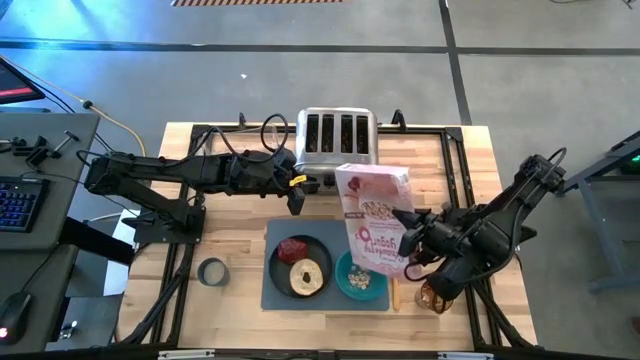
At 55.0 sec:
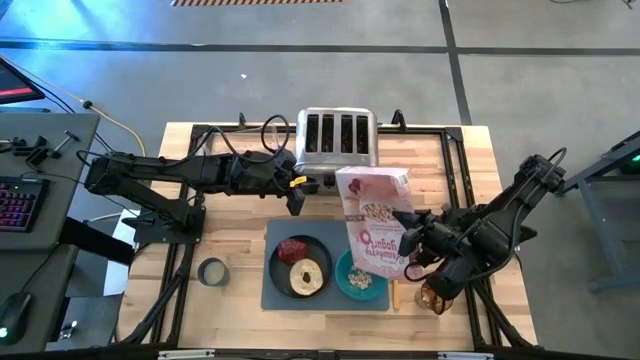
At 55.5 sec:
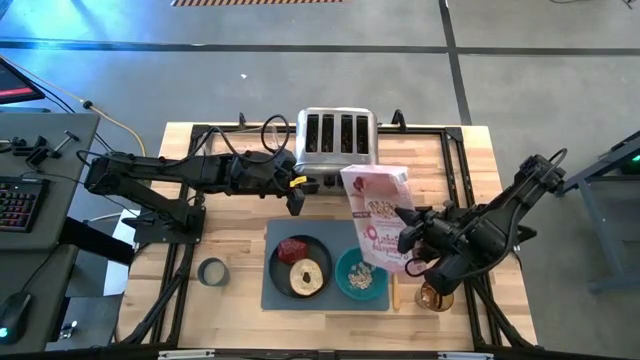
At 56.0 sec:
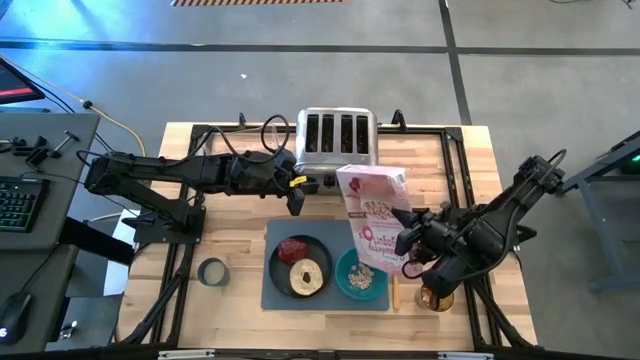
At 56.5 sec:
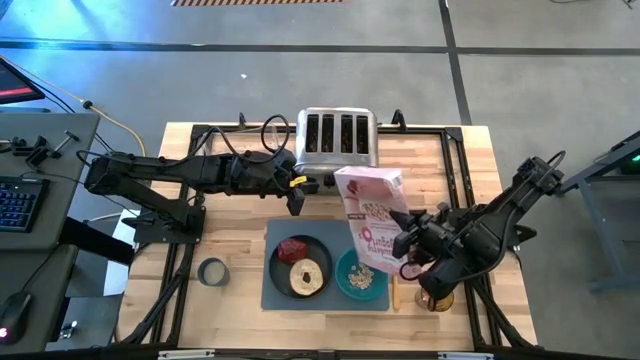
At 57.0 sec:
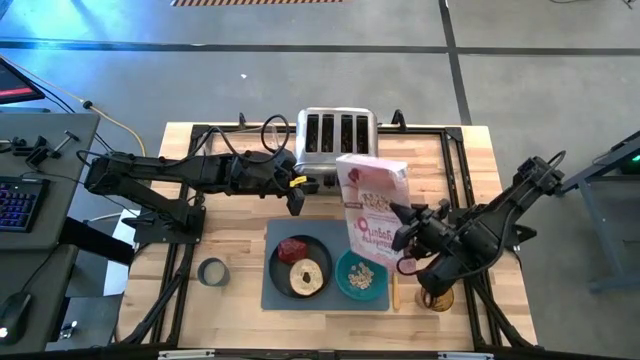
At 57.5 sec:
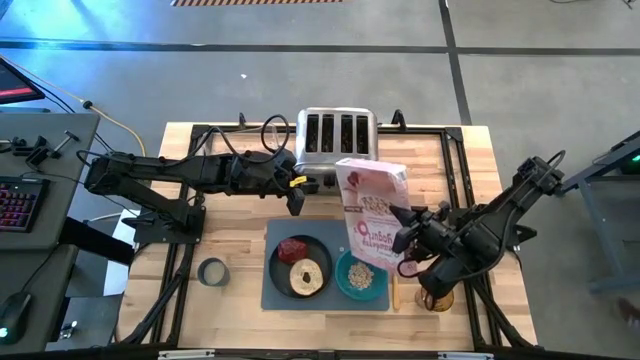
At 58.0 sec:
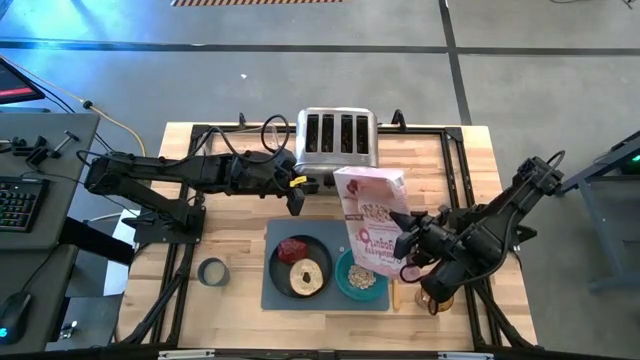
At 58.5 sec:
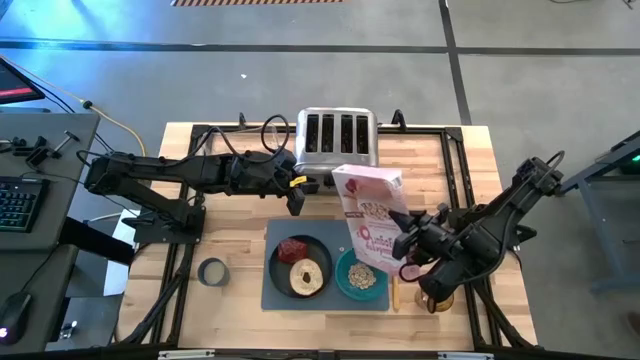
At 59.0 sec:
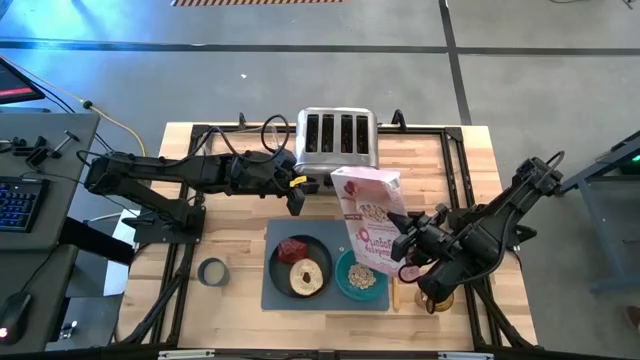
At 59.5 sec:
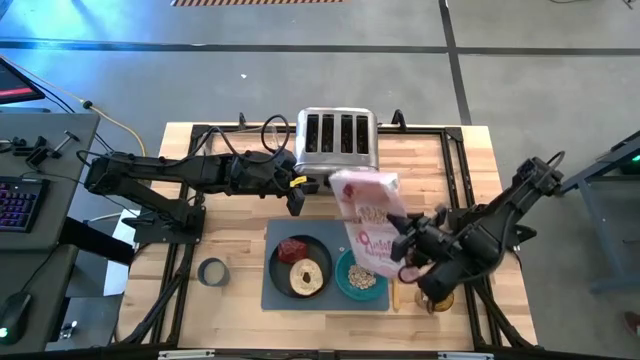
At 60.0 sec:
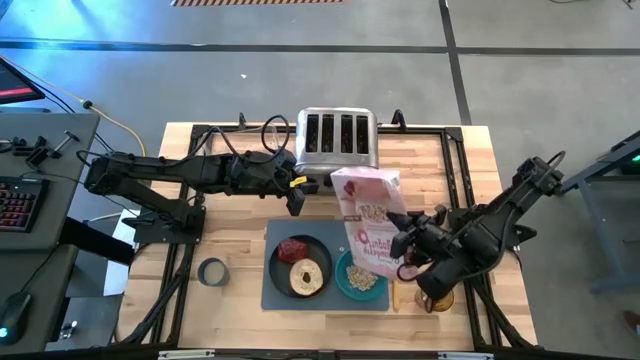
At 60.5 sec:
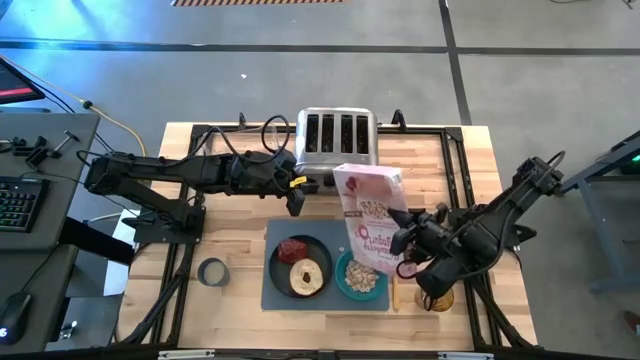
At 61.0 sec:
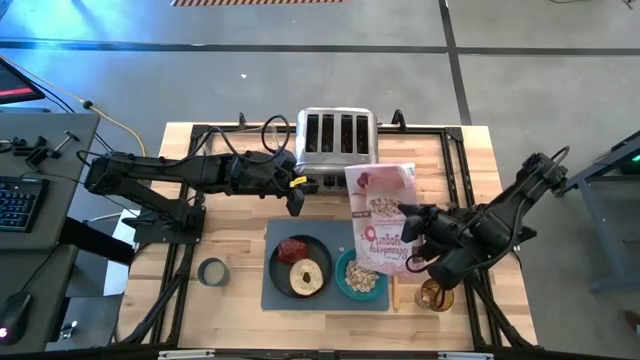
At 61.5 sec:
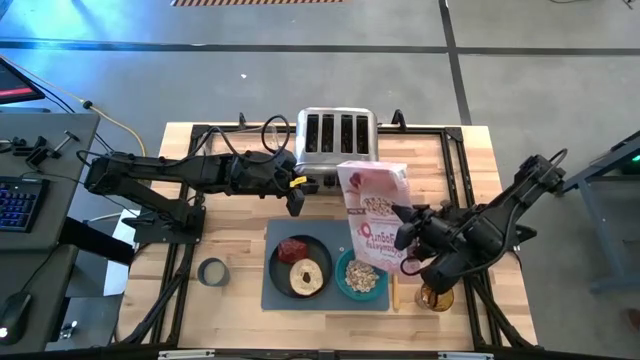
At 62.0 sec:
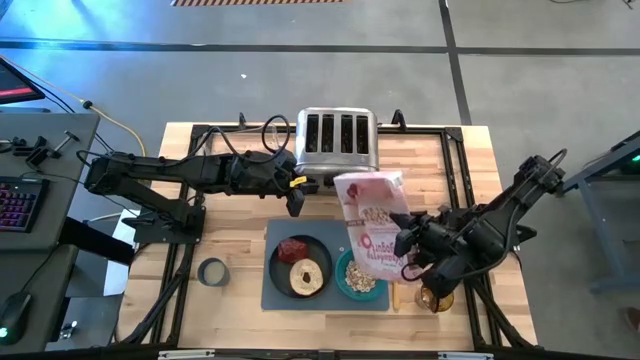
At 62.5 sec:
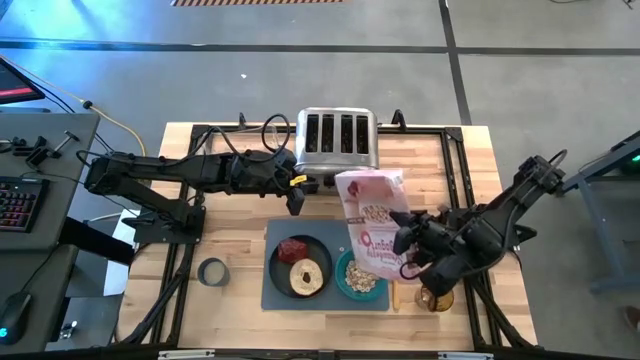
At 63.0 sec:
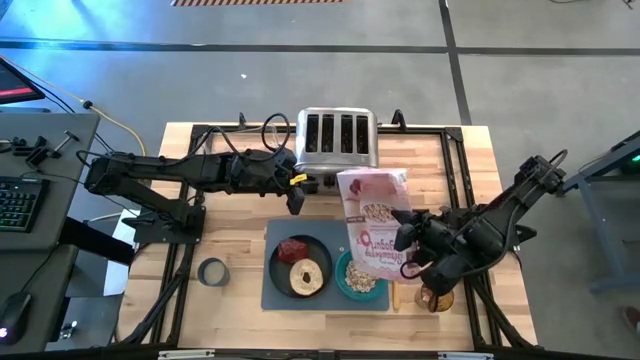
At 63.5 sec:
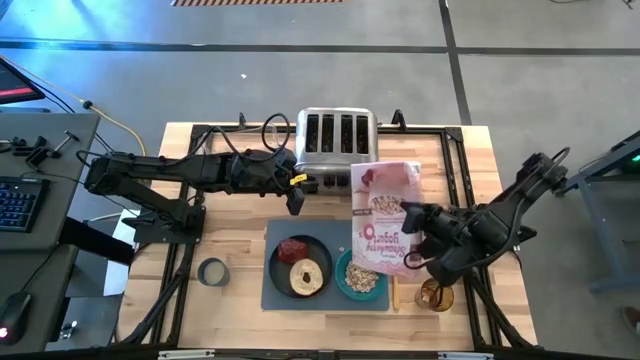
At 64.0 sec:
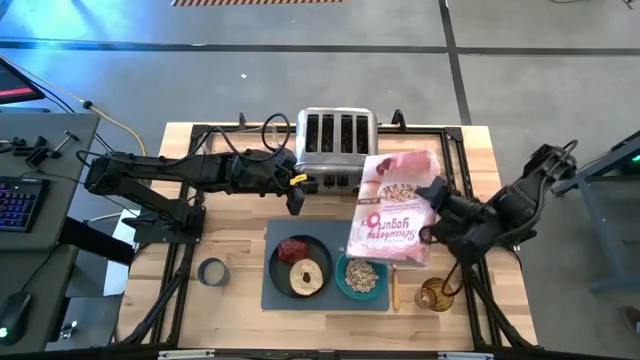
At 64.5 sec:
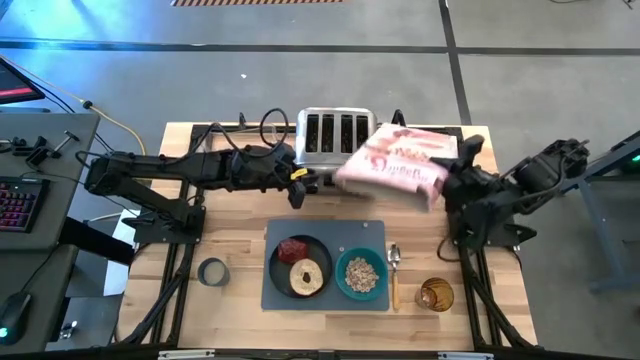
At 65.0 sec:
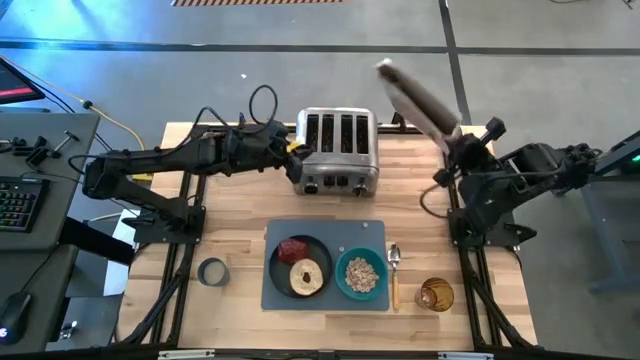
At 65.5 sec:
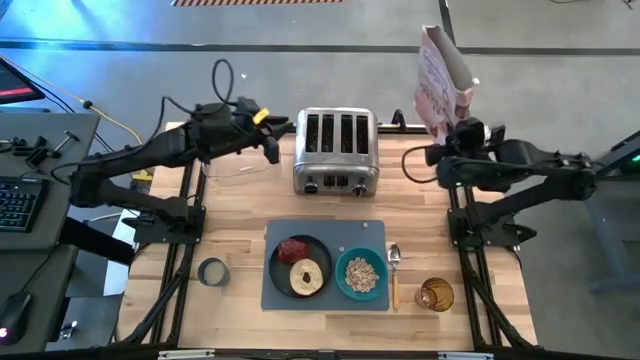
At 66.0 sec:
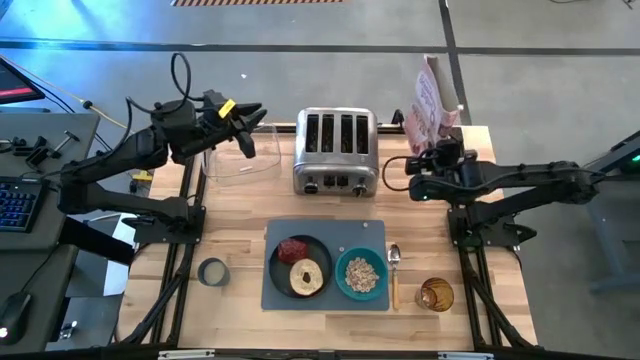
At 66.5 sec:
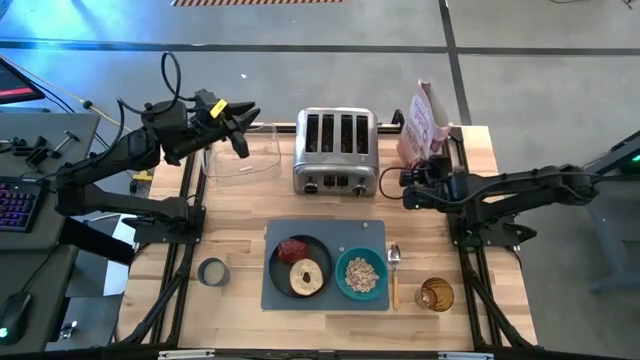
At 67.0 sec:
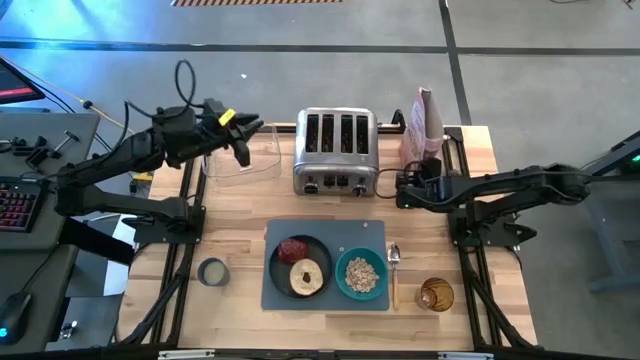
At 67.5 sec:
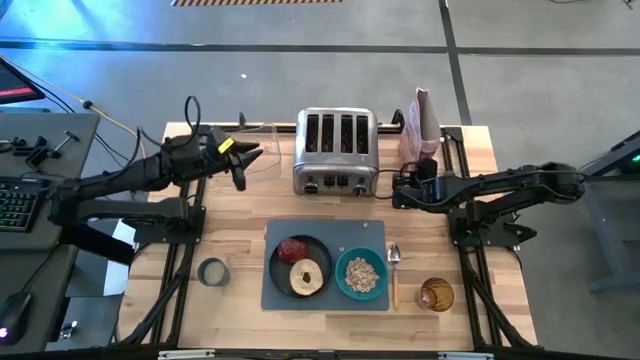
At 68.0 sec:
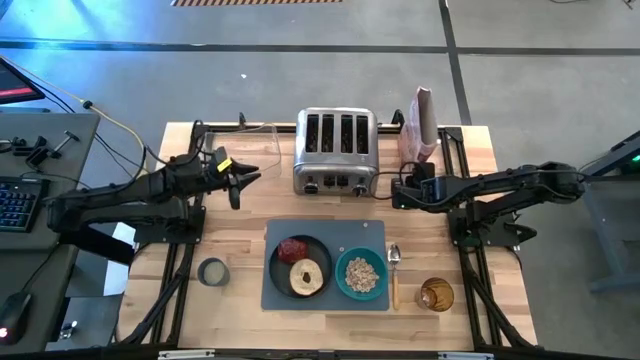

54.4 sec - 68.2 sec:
Task: Arrange a breakfast setting
Pour the cereal from the pink cereal box into the blue bowl

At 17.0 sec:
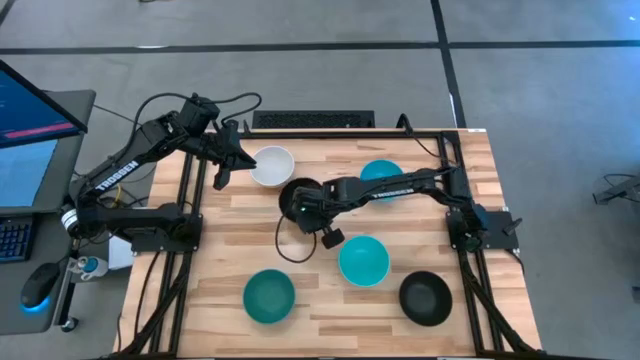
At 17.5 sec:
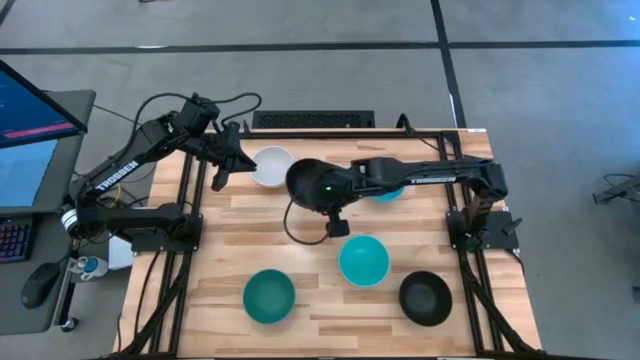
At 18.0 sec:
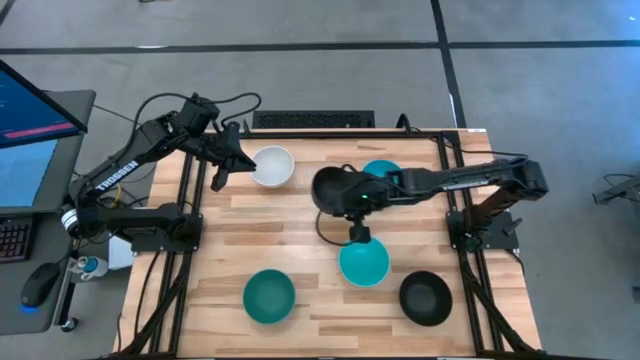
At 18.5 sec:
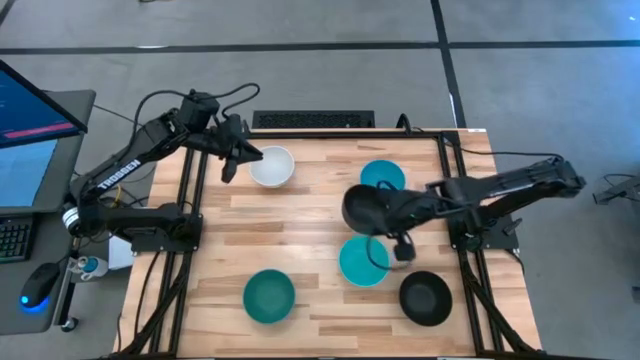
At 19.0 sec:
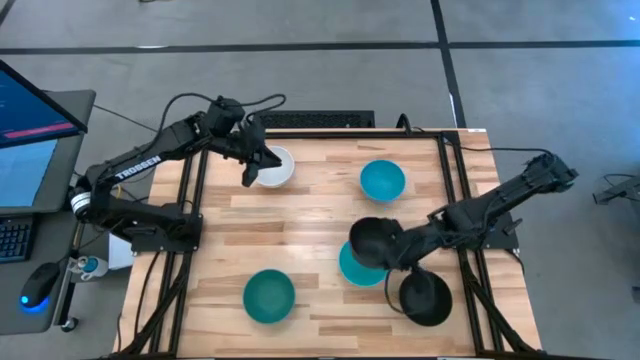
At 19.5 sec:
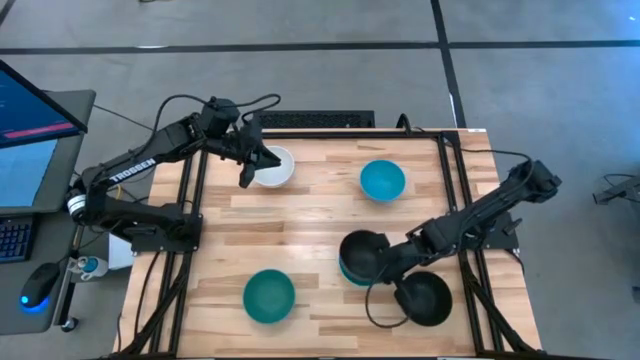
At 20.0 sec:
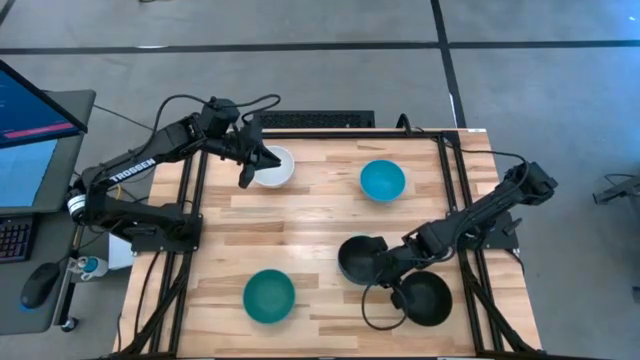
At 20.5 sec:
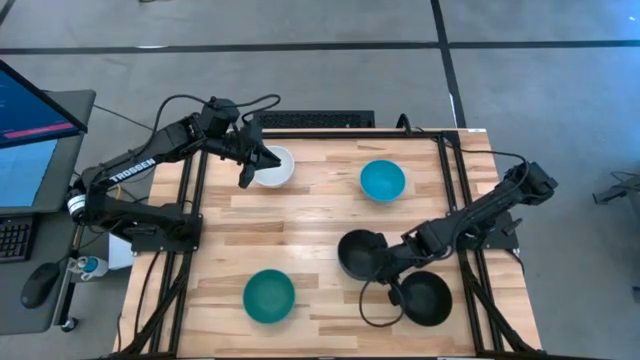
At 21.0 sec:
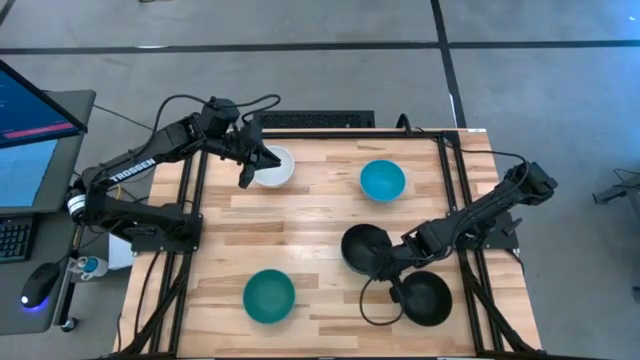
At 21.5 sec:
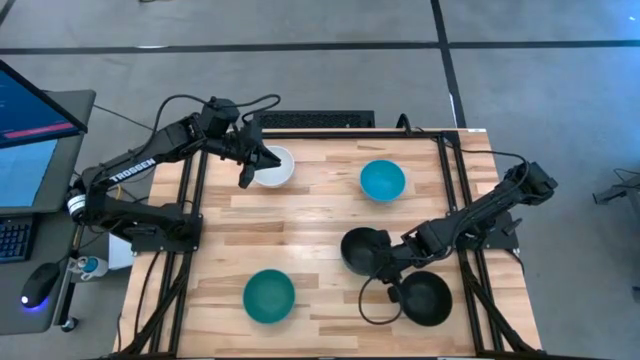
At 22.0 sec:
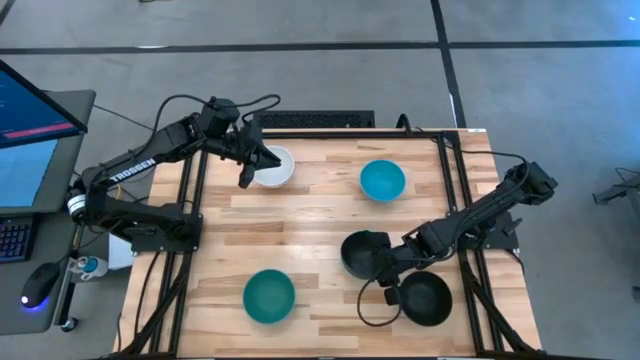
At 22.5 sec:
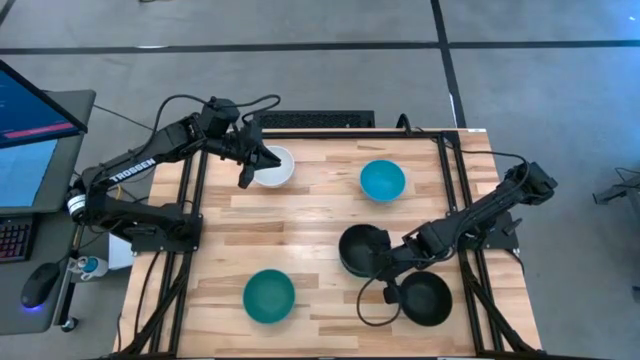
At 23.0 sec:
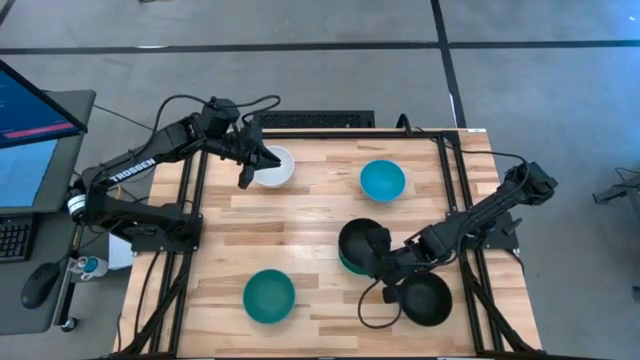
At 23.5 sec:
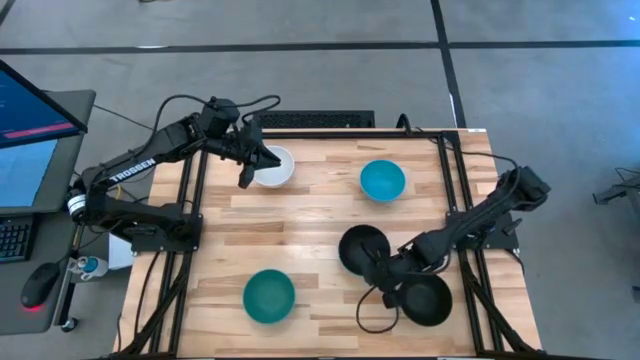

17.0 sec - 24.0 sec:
Task: Nest bowls inside each other
Stack the black bowl on the blue bowl
